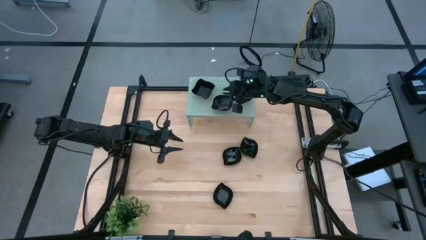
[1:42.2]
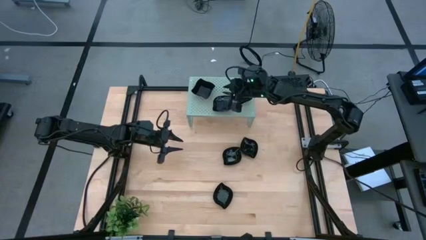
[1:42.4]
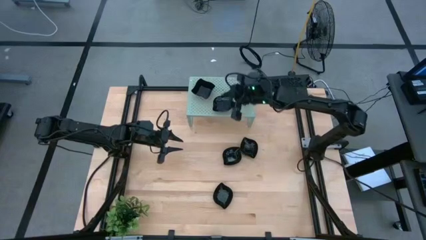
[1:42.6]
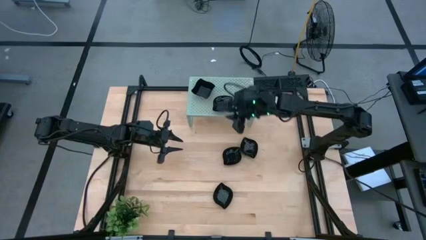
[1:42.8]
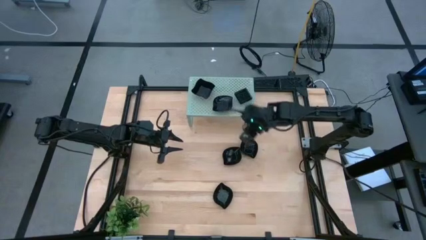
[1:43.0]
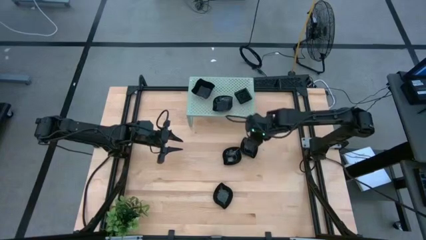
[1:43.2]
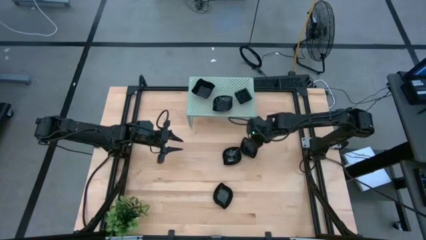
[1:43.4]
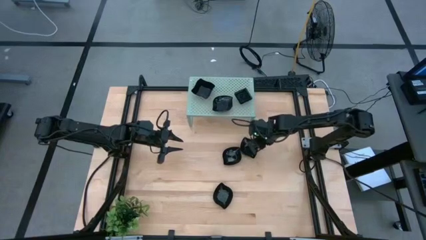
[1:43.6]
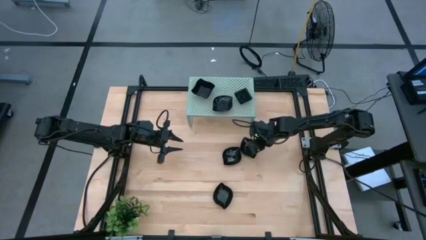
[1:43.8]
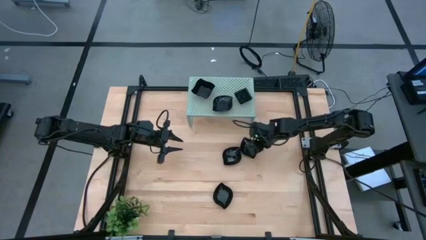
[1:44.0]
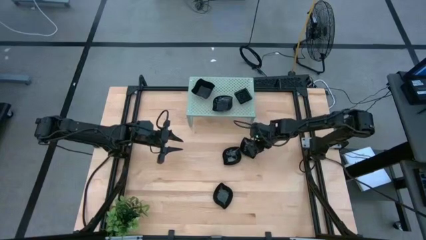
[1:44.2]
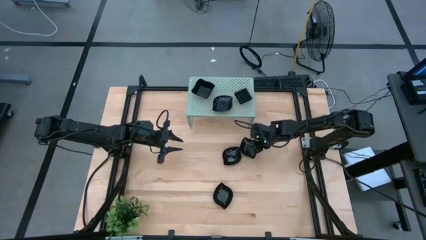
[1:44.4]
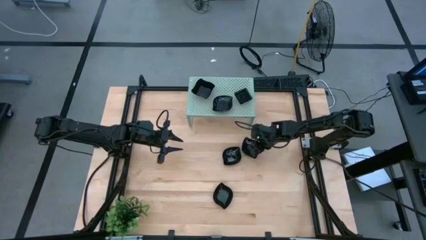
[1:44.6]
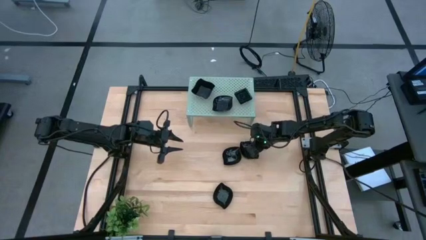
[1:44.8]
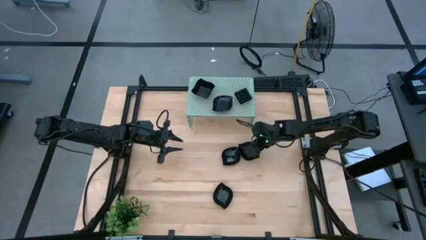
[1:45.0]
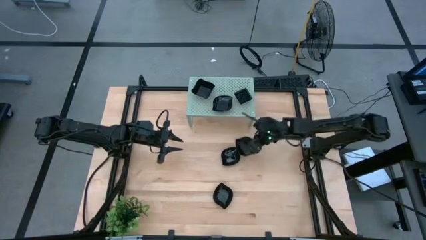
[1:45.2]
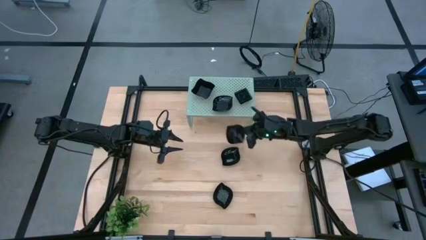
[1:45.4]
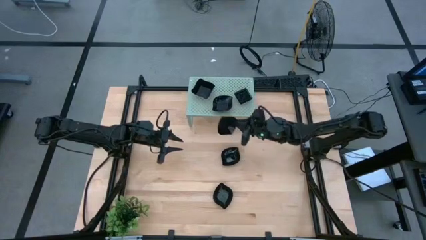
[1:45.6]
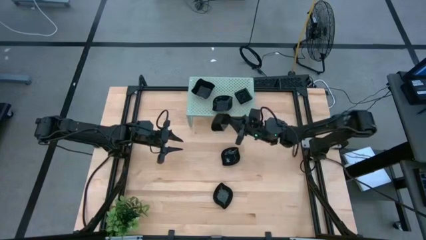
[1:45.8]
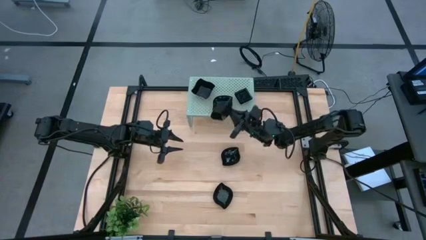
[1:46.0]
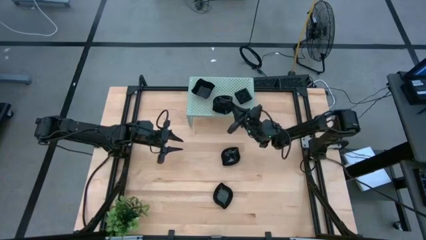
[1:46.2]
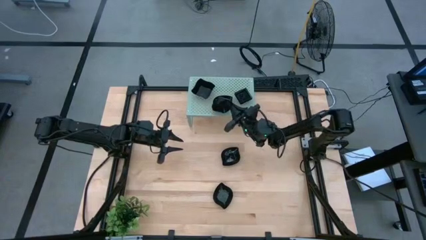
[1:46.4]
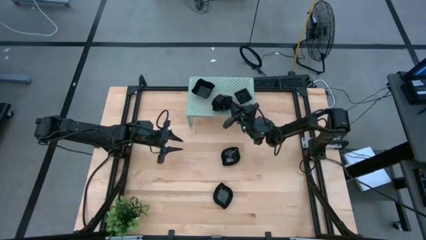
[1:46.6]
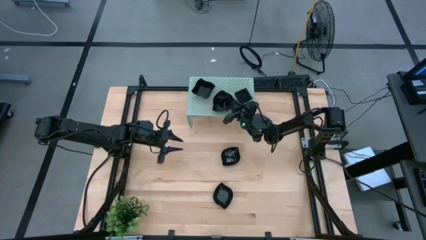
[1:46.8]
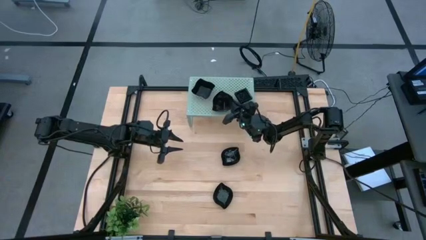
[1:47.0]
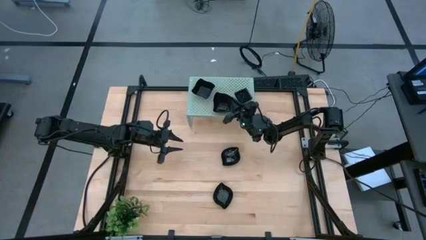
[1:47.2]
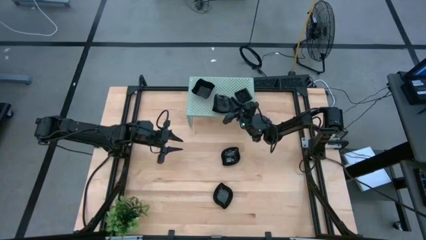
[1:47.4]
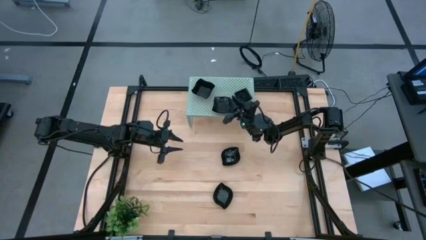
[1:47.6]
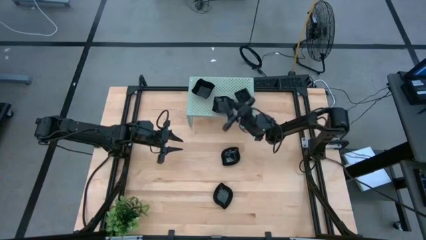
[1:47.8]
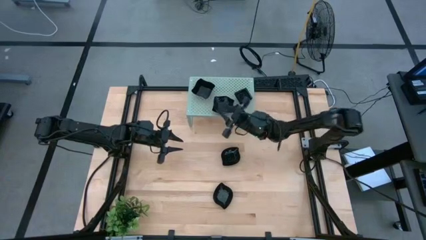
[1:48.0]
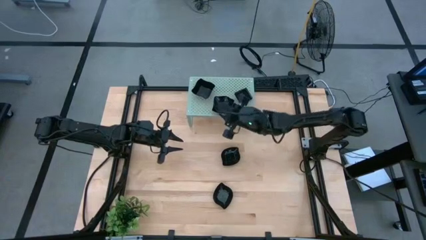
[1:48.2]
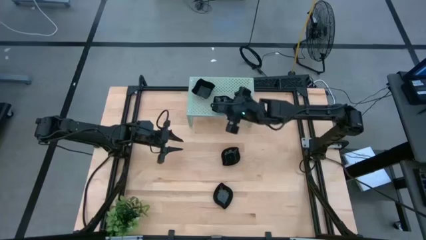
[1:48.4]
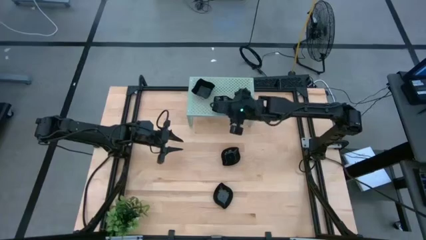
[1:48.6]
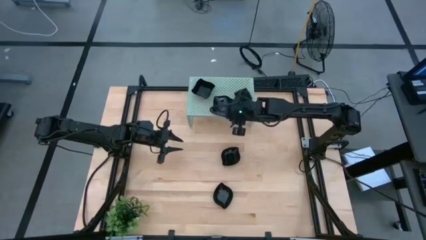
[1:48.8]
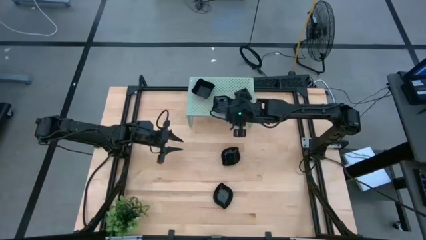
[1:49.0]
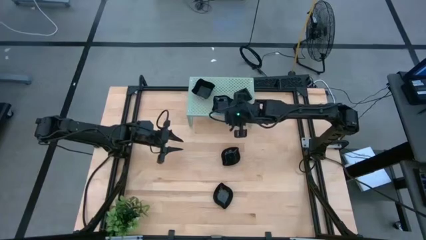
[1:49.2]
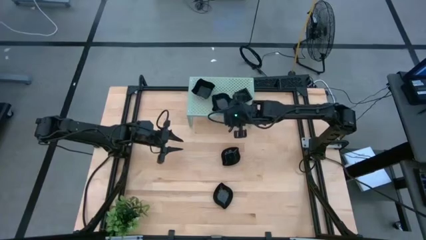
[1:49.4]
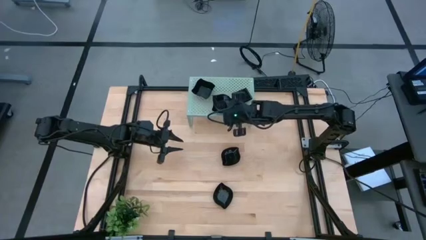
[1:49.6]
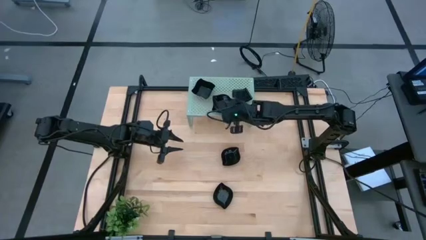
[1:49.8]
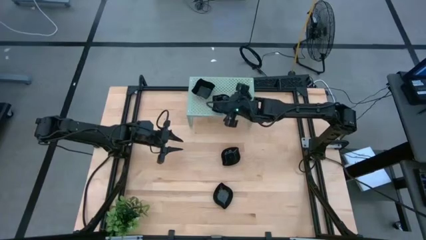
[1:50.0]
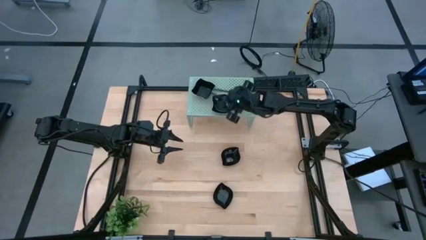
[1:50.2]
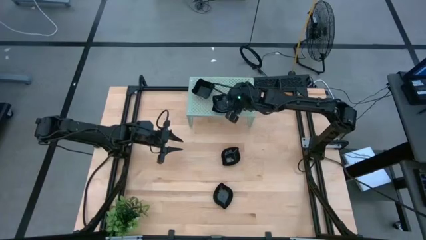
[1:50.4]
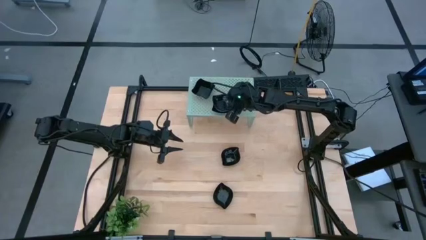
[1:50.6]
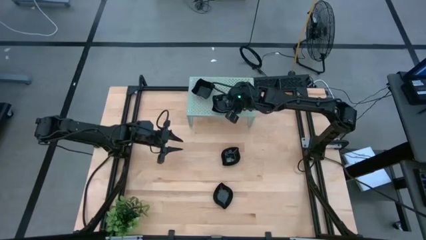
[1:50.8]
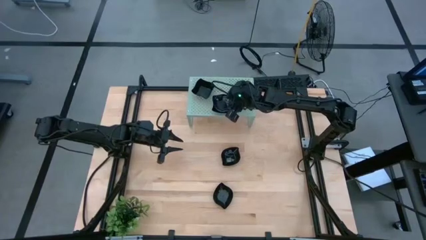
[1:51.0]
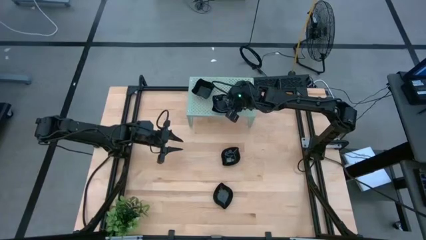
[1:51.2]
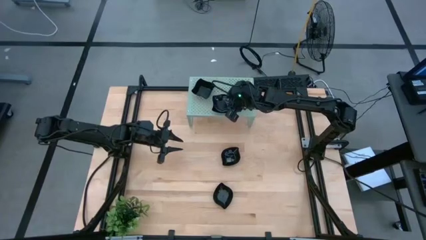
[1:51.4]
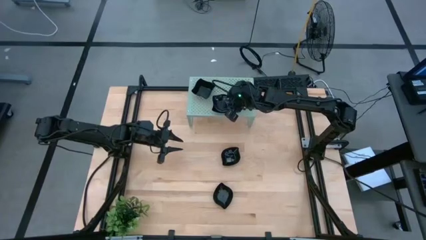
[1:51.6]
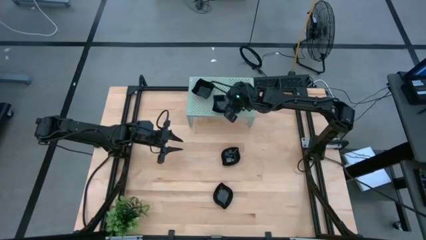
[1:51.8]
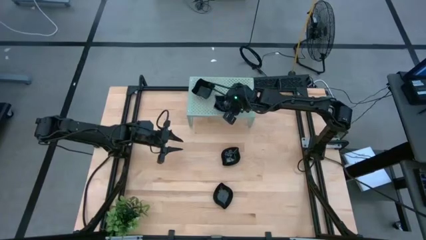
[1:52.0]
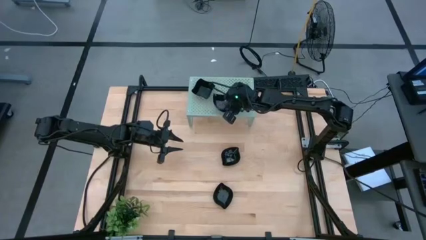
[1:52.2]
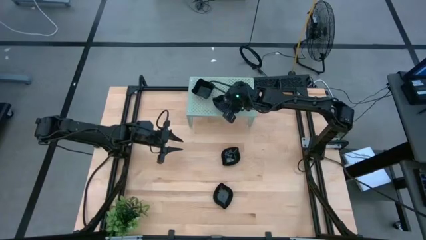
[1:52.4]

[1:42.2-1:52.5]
Task: Pick & Place Mini shaped plates
Stack the black leaf shaped plate on top of the other black leaf shaped plates on the shelf

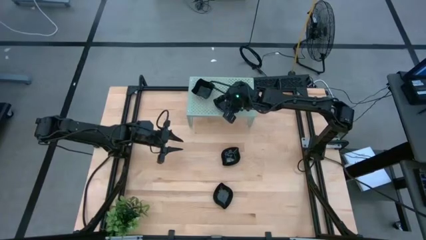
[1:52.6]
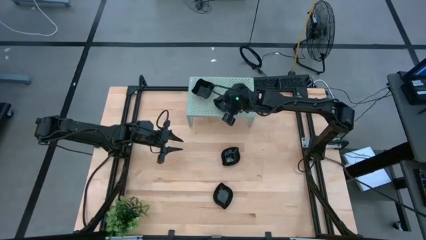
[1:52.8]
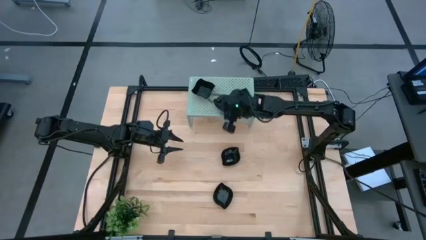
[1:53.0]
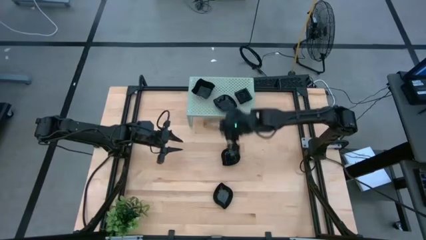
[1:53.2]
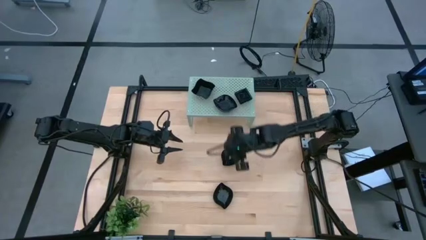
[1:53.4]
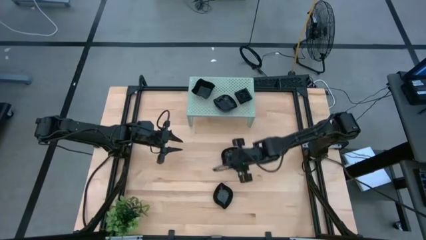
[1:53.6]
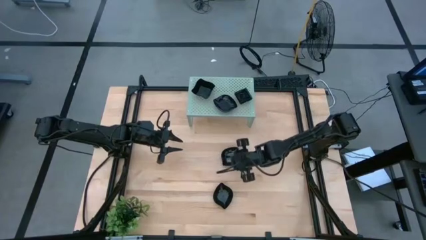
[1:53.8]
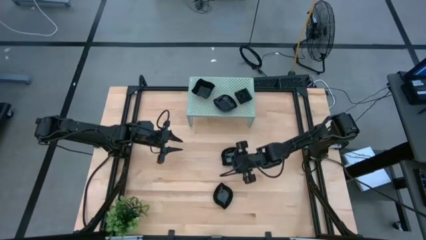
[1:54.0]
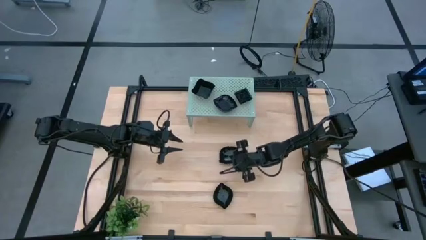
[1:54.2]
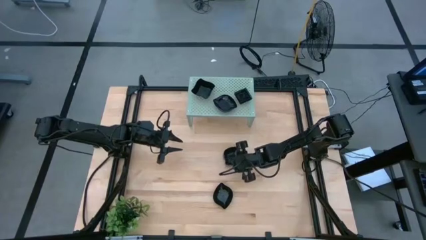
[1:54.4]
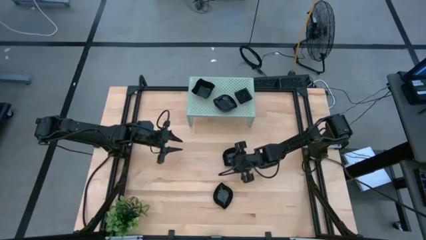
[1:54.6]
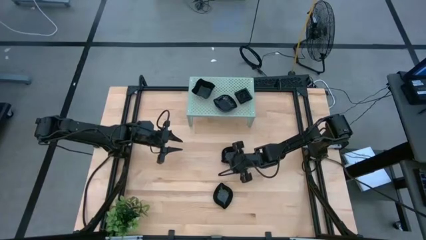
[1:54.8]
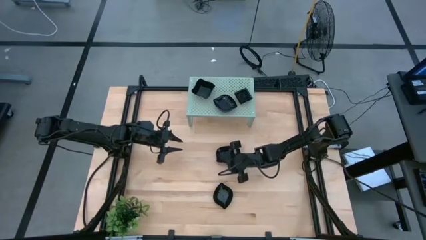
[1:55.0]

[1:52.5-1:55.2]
Stack the black leaf shaped plate on top of the other black leaf shaped plates on the shelf

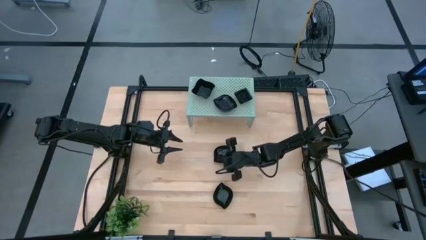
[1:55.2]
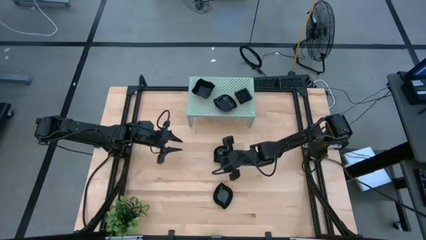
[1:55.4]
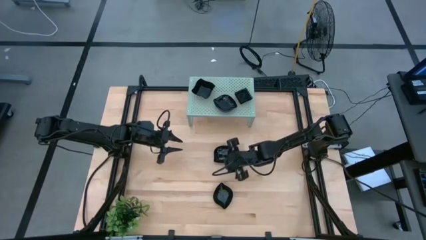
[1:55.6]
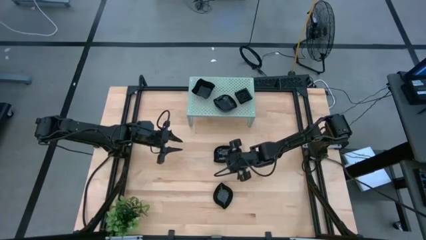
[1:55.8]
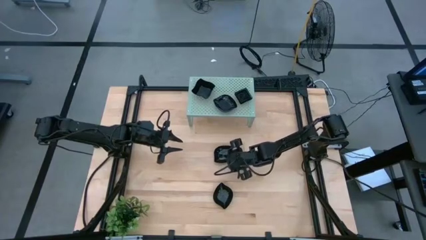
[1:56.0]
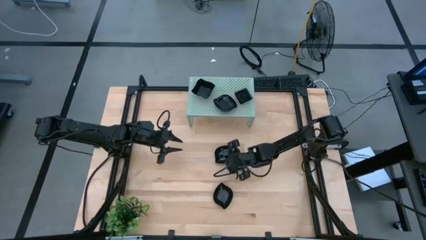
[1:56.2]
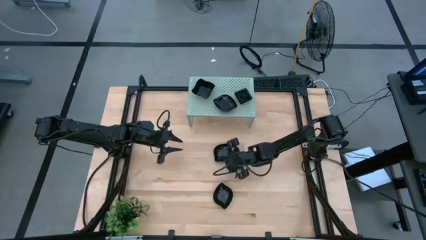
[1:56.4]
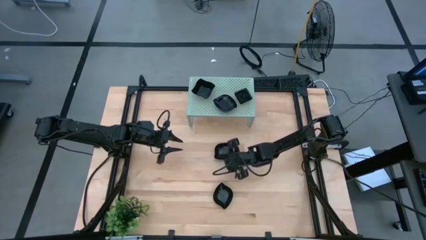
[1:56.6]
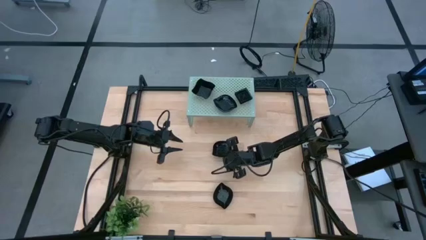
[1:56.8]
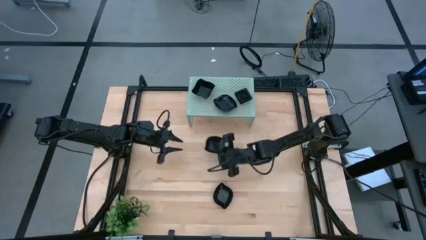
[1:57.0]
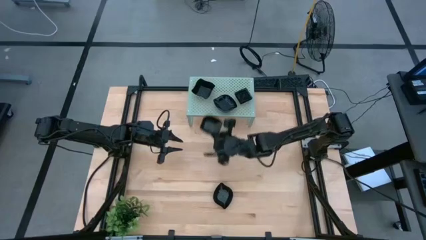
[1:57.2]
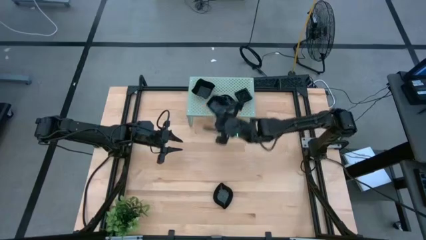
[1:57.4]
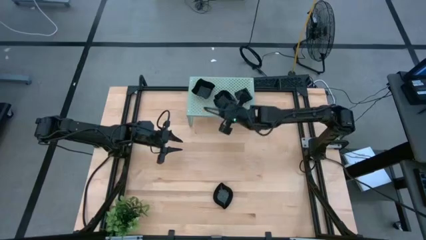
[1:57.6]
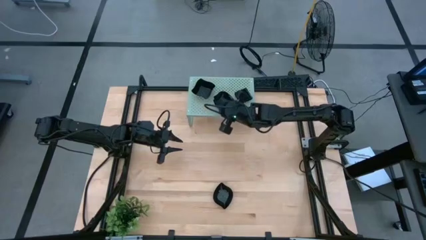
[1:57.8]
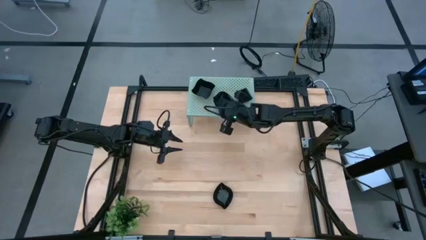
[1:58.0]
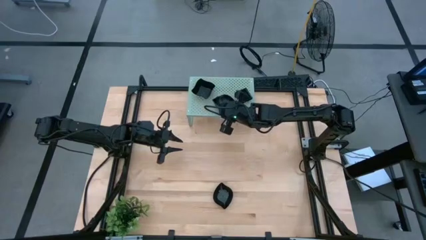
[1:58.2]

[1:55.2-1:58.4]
Stack the black leaf shaped plate on top of the other black leaf shaped plates on the shelf
